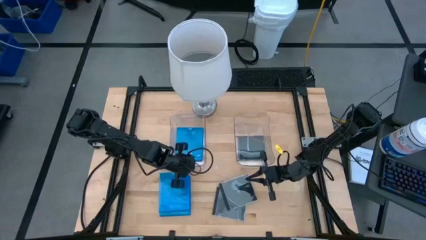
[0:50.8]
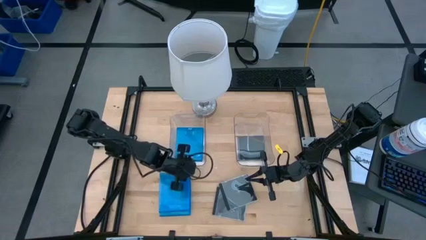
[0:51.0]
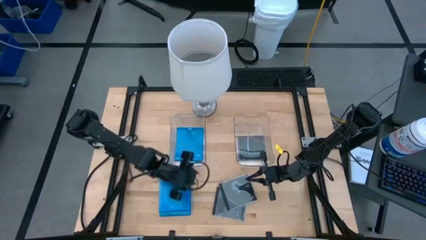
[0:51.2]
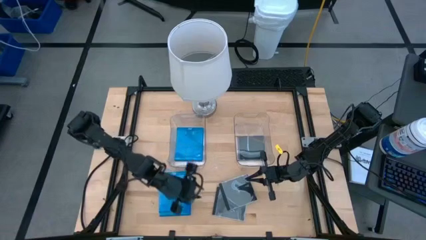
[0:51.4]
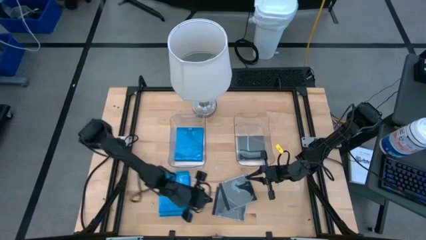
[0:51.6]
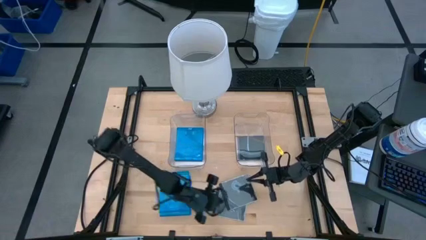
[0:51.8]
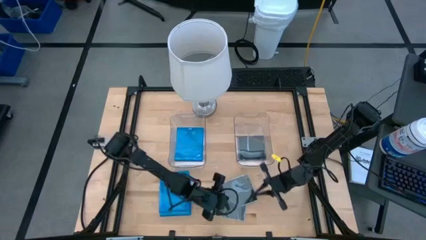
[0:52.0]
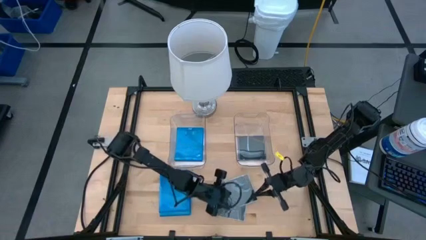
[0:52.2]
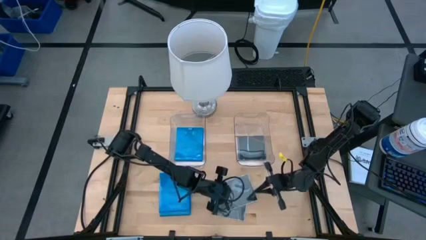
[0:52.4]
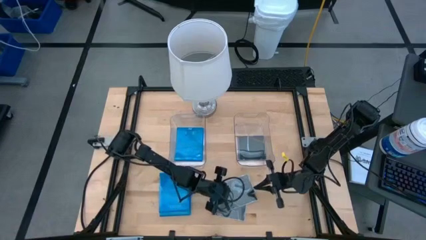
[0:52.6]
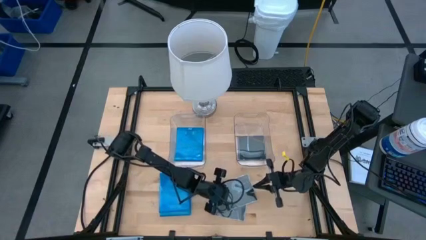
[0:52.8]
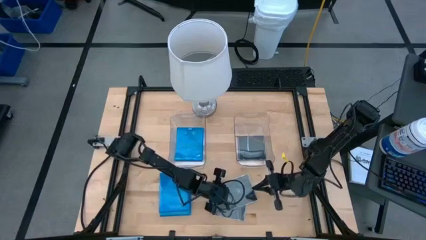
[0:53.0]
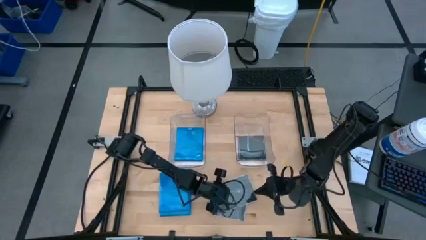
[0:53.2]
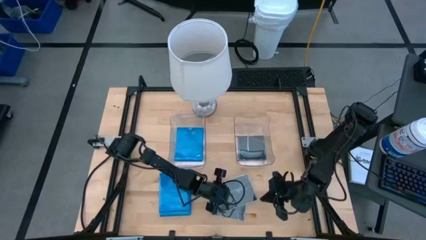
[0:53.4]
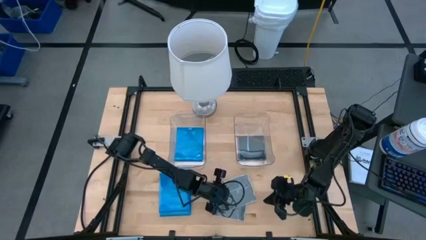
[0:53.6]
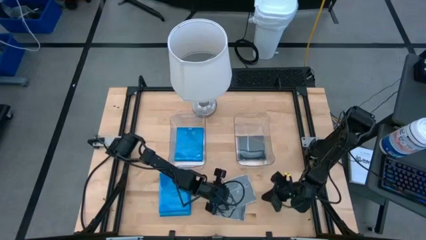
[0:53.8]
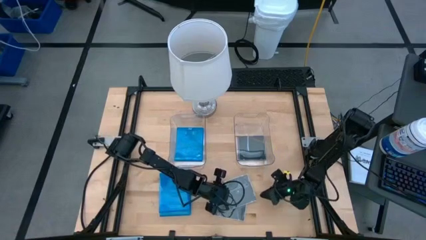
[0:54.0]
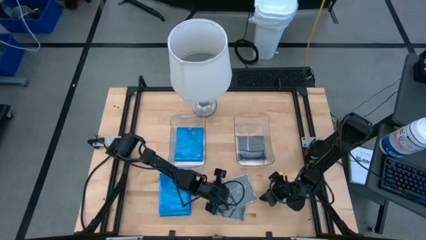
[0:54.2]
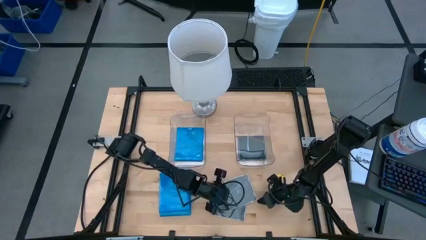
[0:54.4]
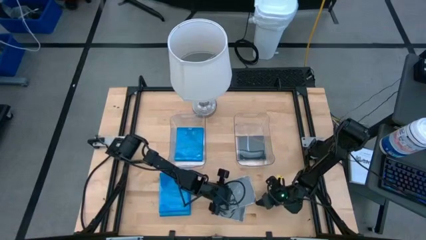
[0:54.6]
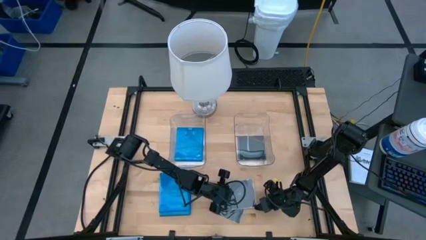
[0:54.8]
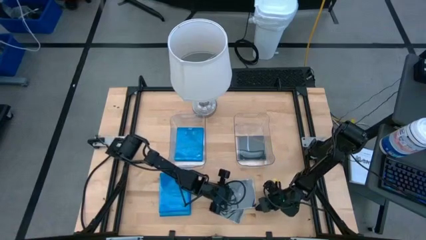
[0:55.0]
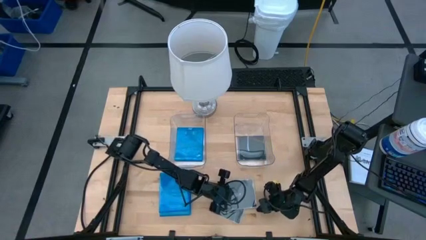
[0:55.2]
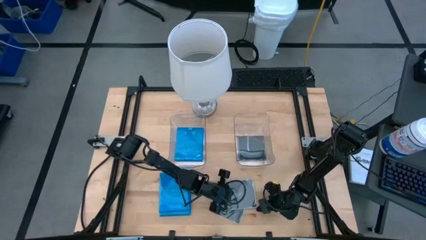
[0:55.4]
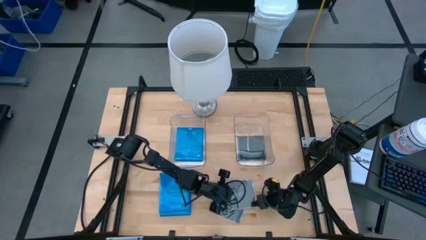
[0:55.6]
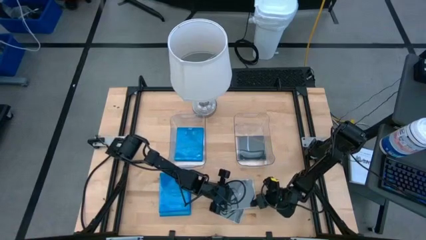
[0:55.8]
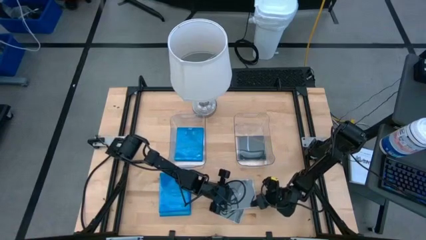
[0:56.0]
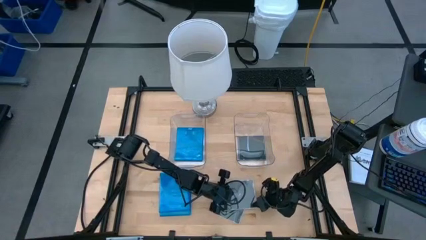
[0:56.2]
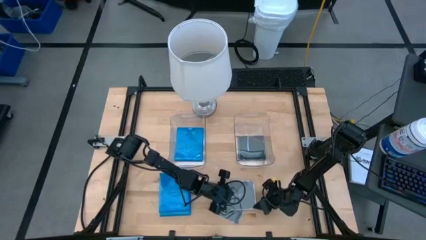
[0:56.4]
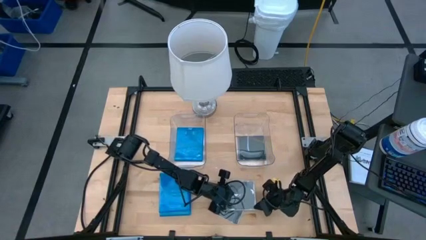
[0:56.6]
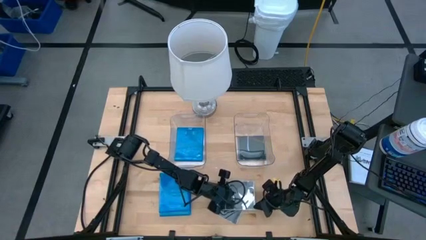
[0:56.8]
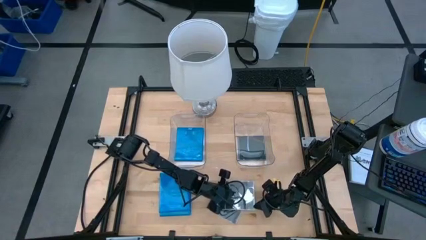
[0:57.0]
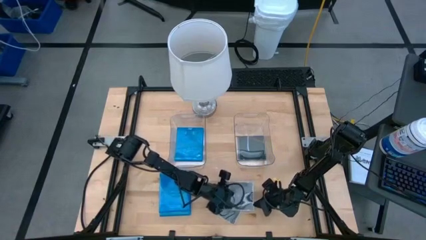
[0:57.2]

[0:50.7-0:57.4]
Task: Pick & place jewel cases by type
Put the black CD case into the right transparent bin

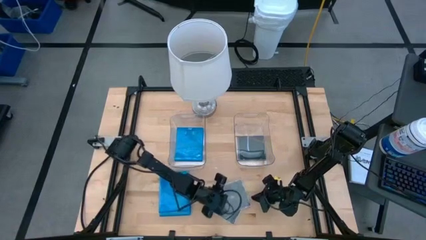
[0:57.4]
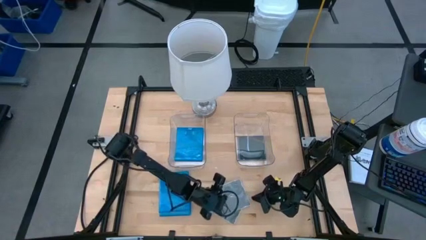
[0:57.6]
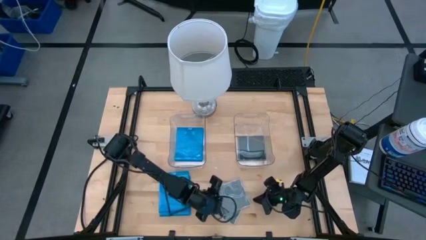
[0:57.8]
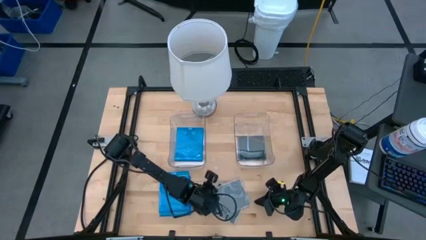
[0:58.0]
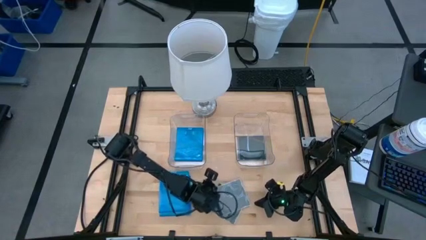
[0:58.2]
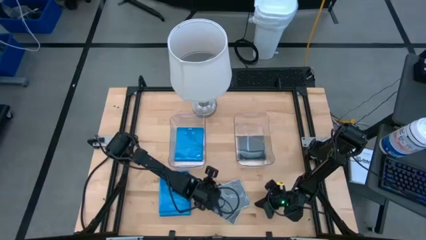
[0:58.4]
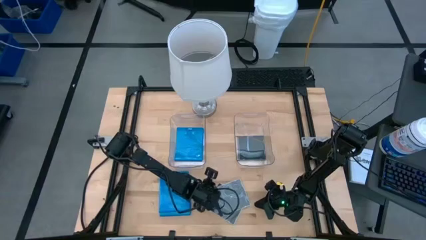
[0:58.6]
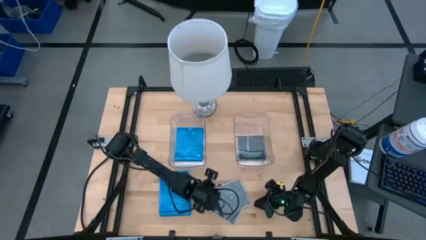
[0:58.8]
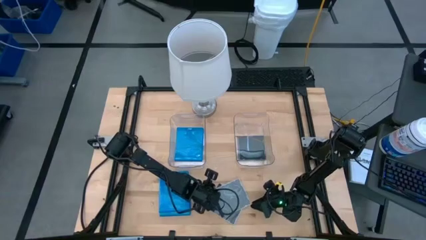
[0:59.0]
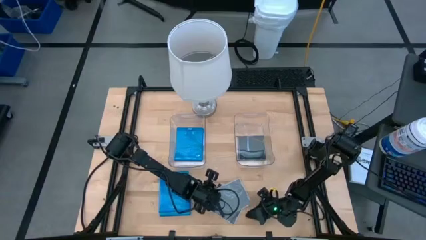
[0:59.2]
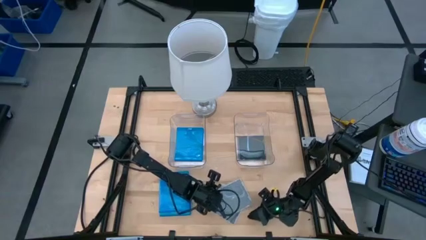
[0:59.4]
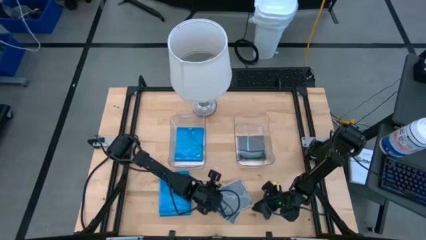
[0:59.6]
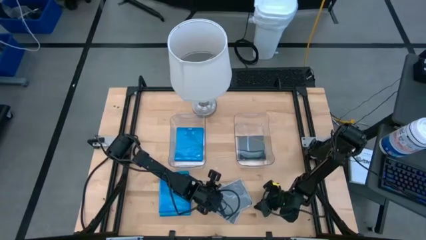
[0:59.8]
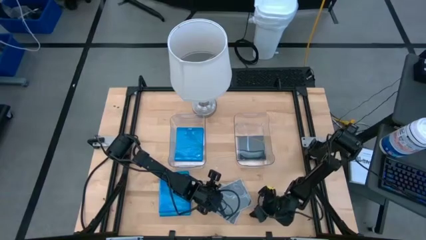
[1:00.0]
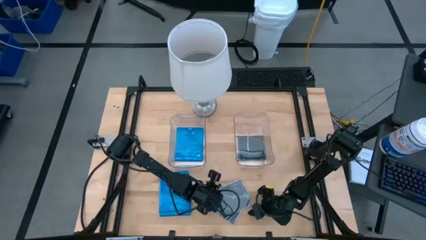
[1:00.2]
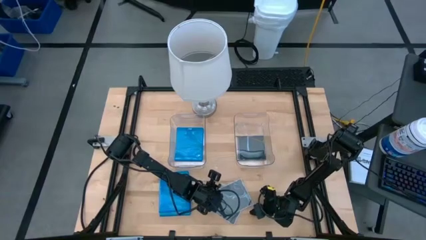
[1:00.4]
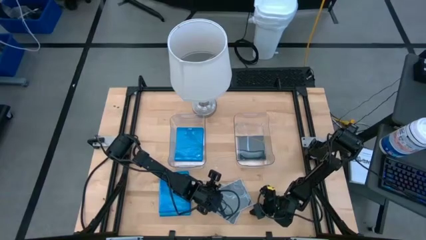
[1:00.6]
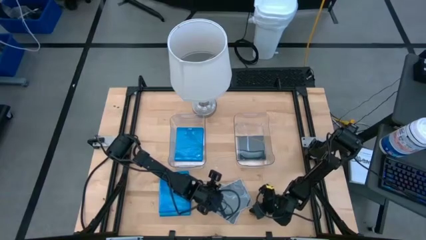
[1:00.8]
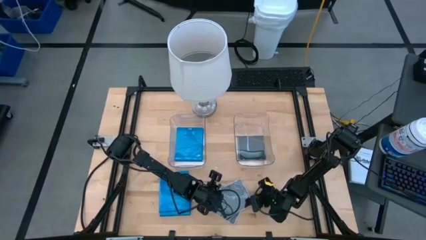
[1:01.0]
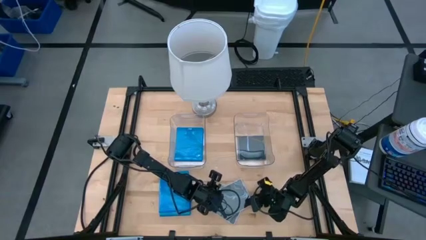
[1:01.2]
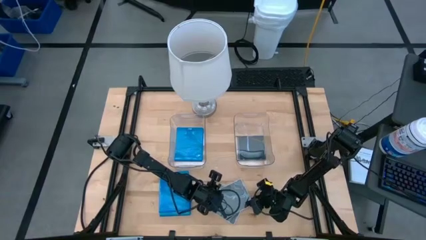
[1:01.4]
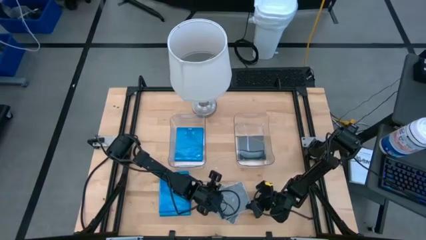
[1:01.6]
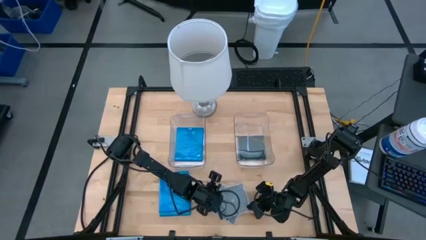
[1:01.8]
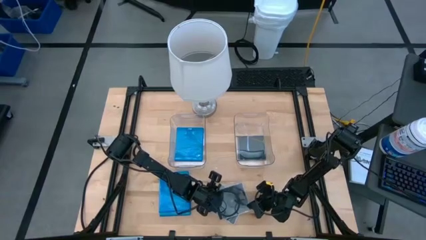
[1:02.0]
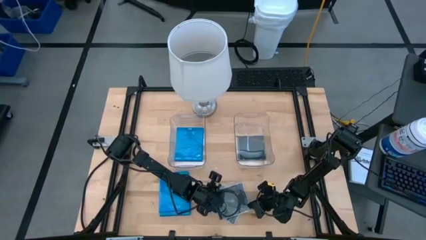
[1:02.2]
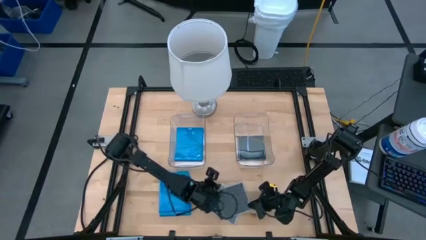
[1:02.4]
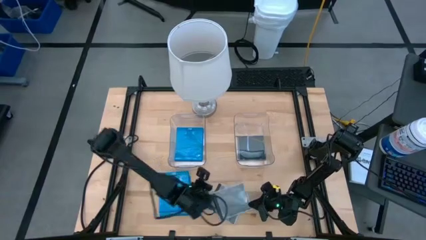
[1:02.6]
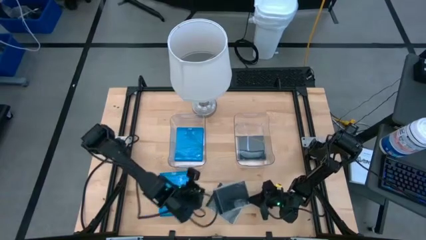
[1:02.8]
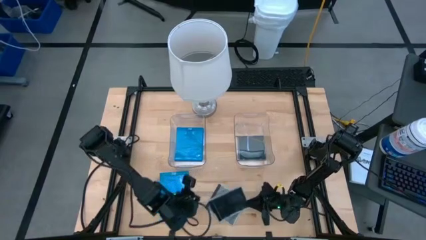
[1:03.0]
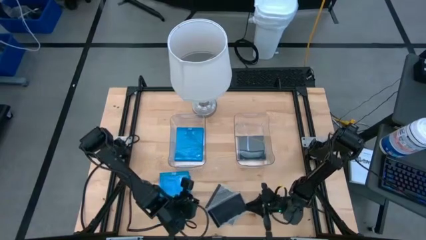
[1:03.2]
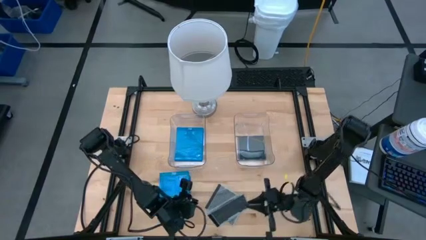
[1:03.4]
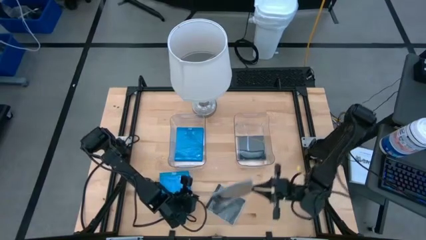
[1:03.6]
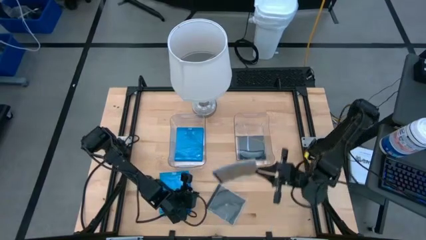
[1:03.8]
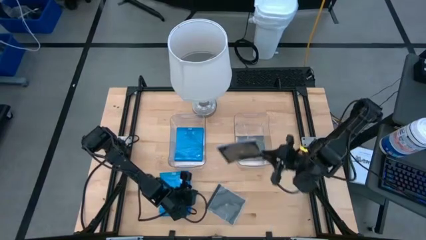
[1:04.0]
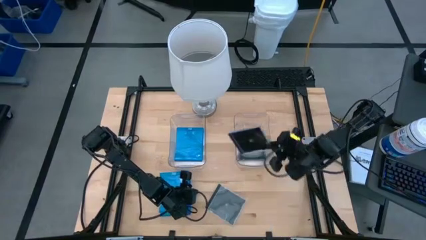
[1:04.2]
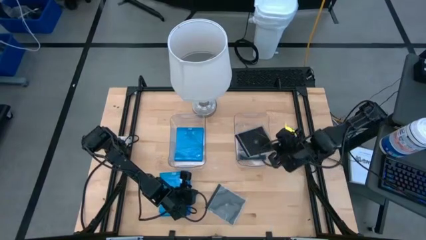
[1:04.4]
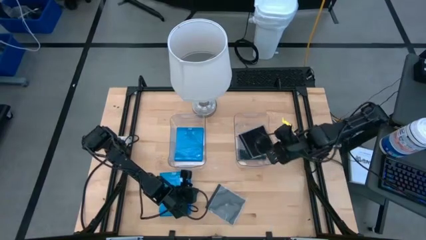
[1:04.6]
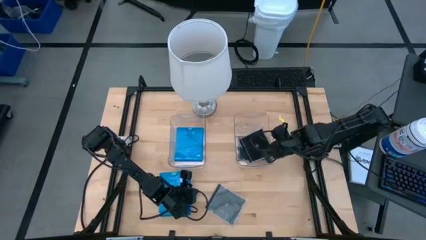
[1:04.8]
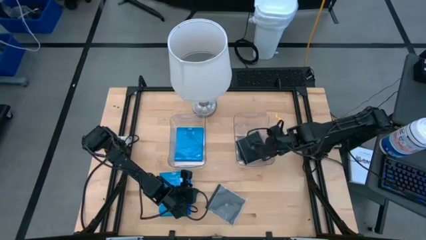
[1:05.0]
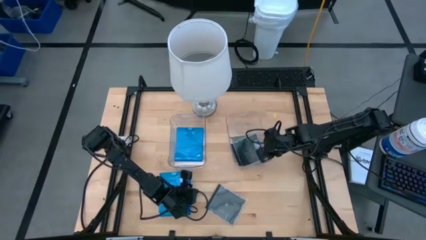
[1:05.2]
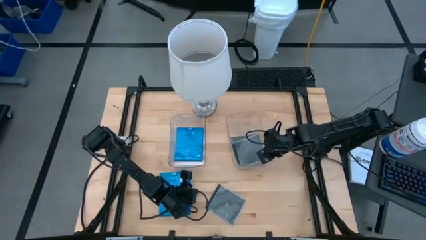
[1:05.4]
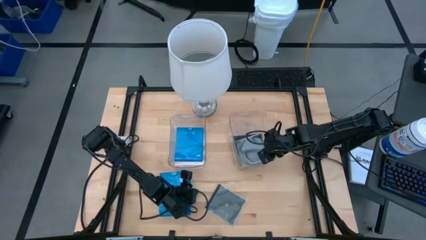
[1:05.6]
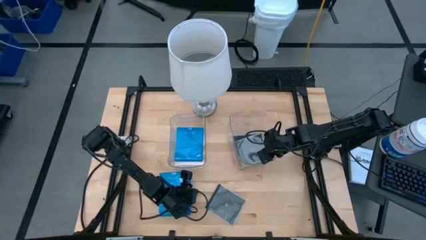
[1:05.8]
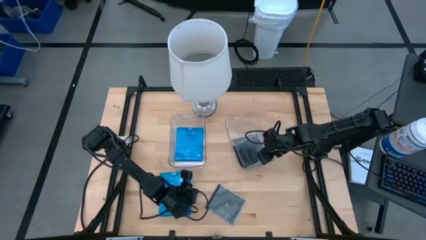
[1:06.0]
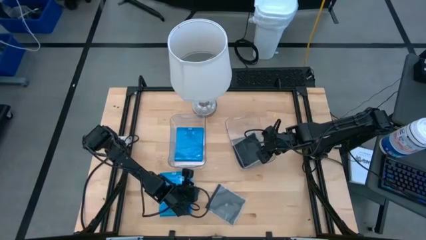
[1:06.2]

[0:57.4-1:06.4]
Put the black CD case into the right transparent bin
